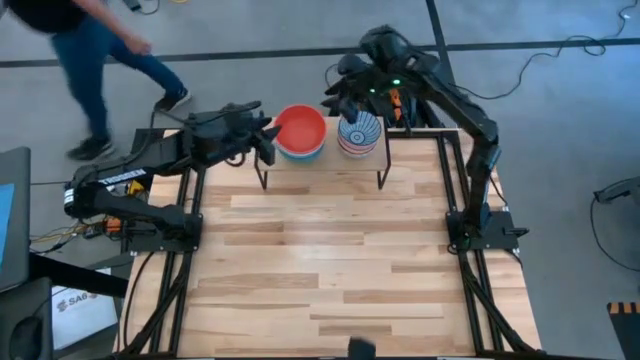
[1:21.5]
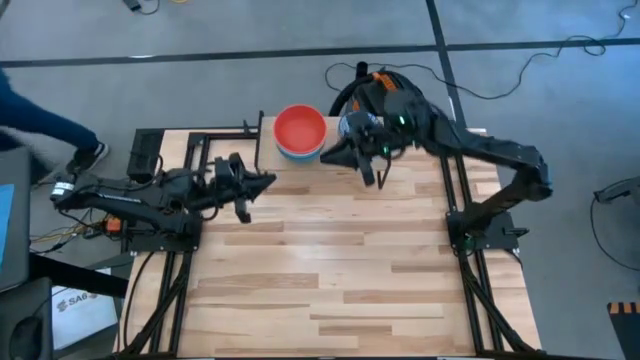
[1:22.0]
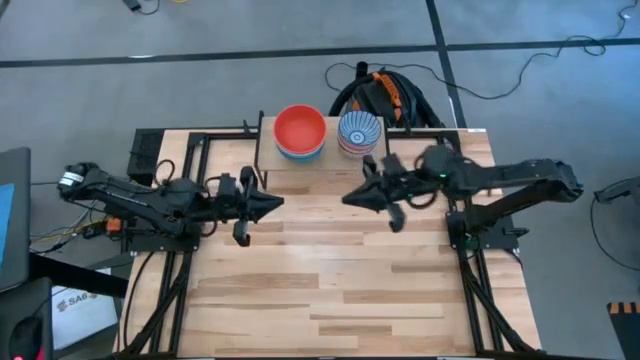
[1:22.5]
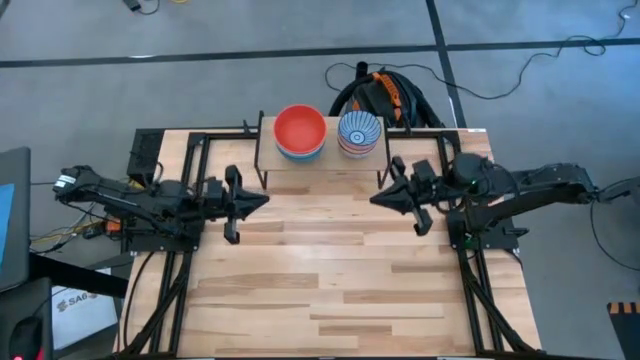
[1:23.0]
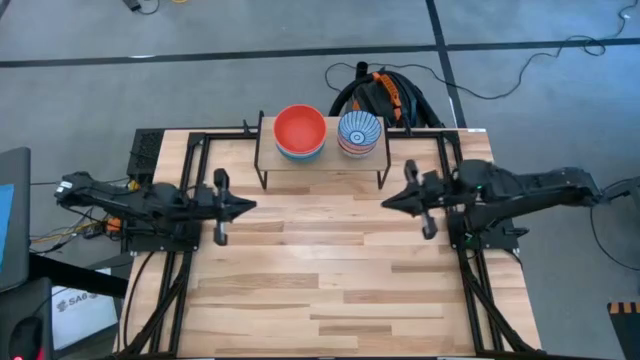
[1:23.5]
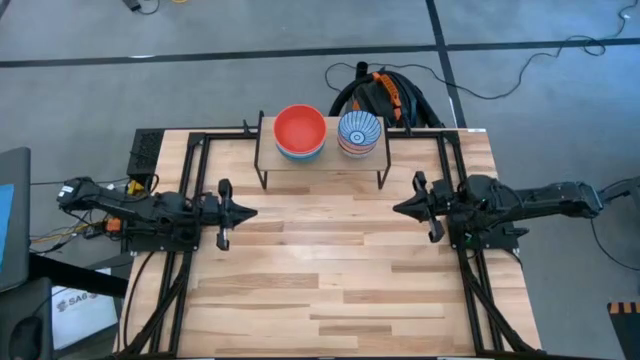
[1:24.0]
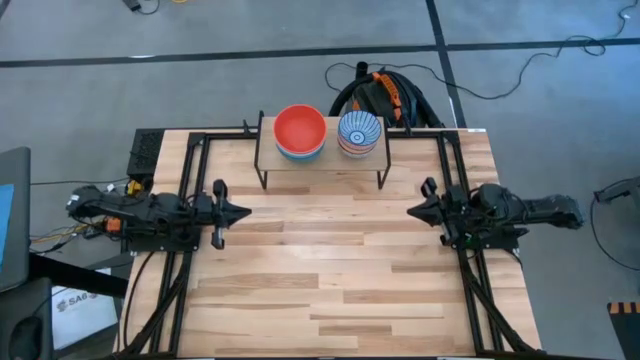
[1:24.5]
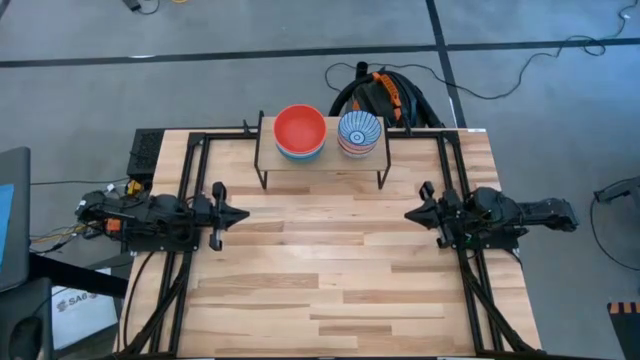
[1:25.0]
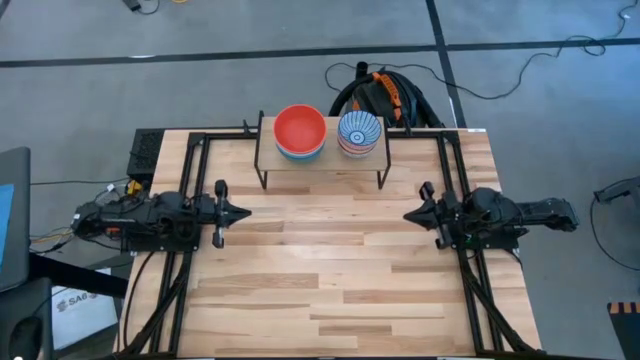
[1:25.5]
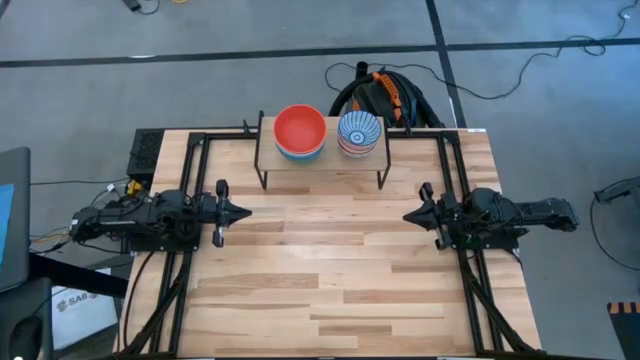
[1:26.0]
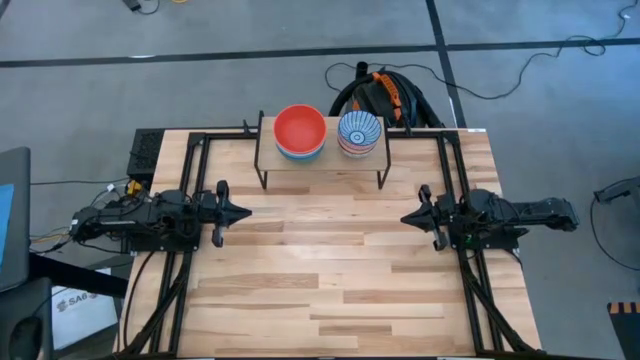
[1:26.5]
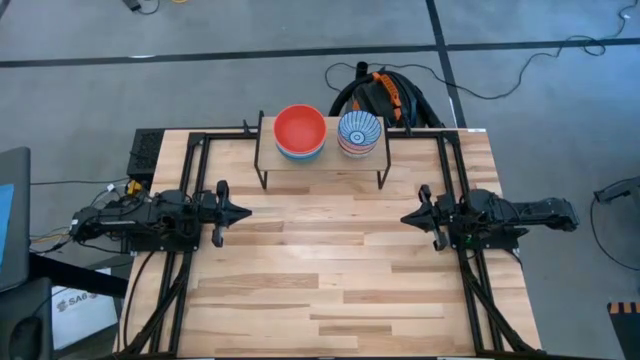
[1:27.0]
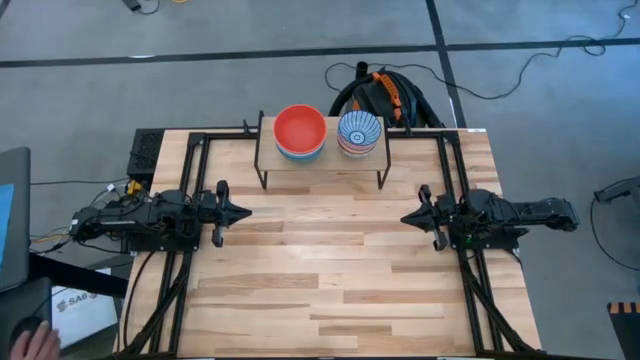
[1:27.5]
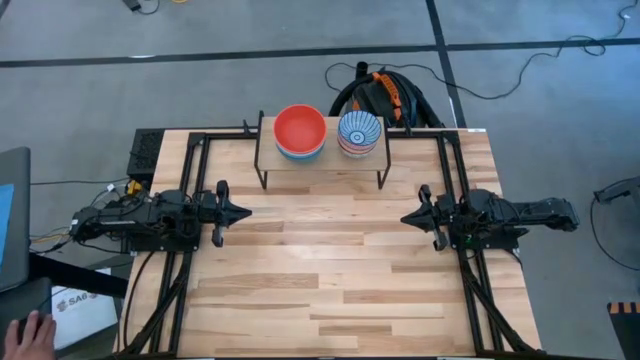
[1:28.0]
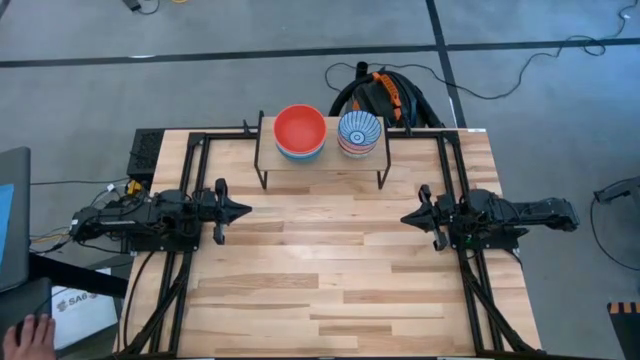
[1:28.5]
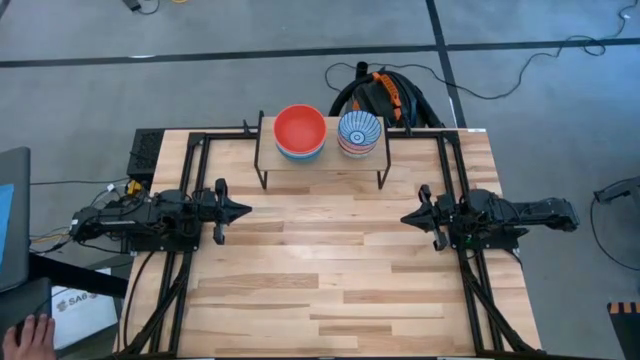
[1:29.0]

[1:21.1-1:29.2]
Task: Place and stack bowls onto a shelf
Return to Home Position

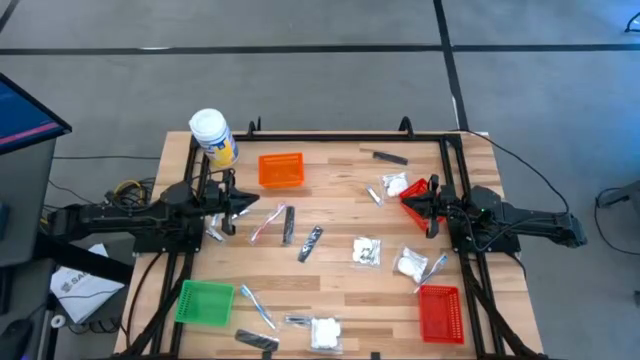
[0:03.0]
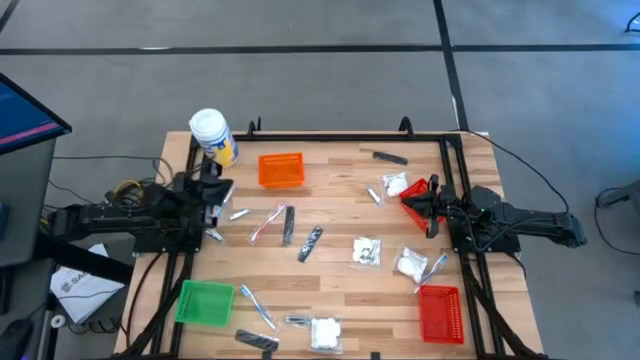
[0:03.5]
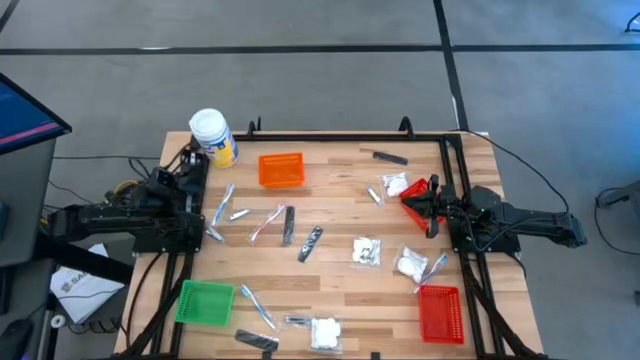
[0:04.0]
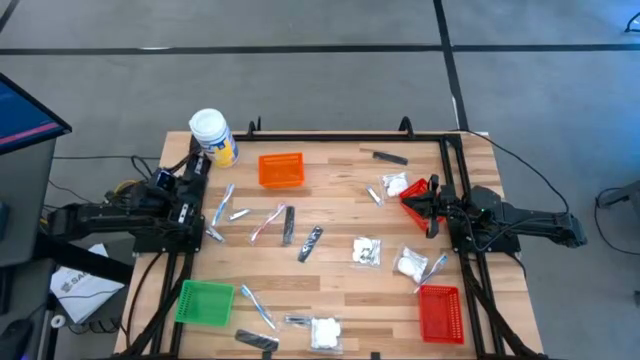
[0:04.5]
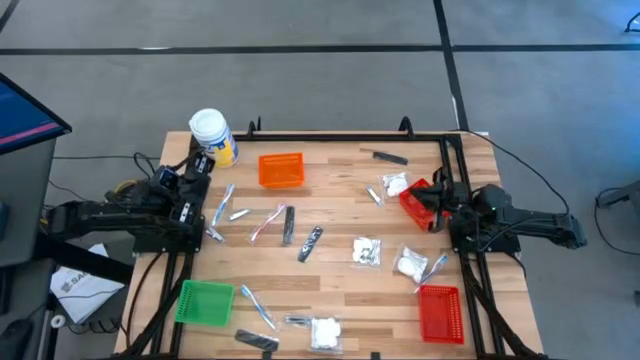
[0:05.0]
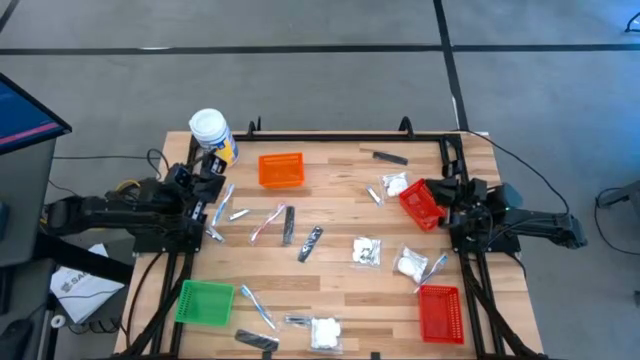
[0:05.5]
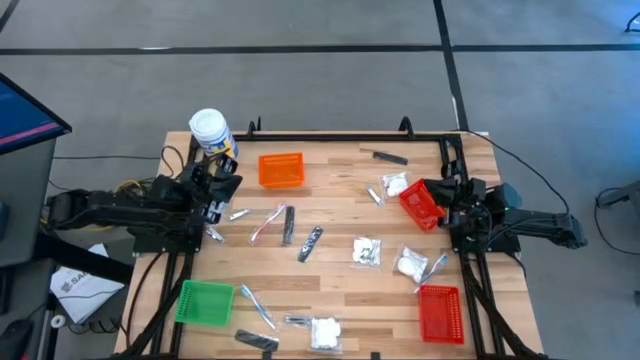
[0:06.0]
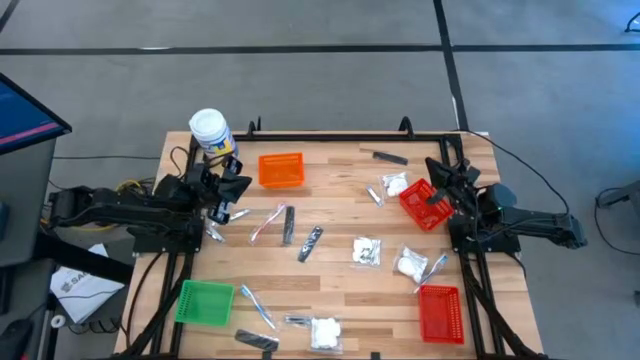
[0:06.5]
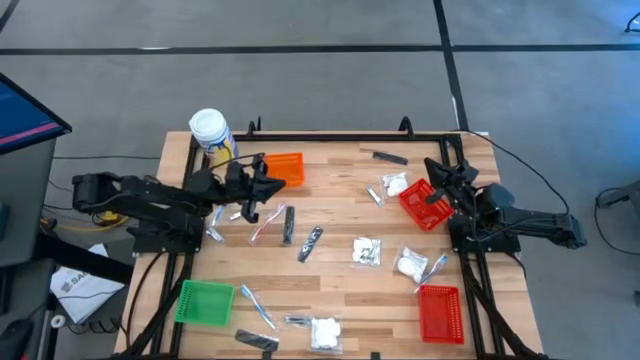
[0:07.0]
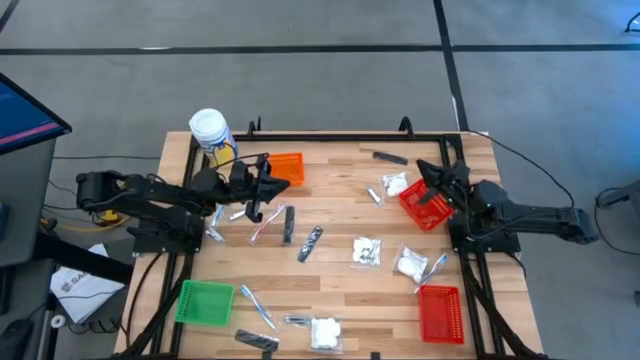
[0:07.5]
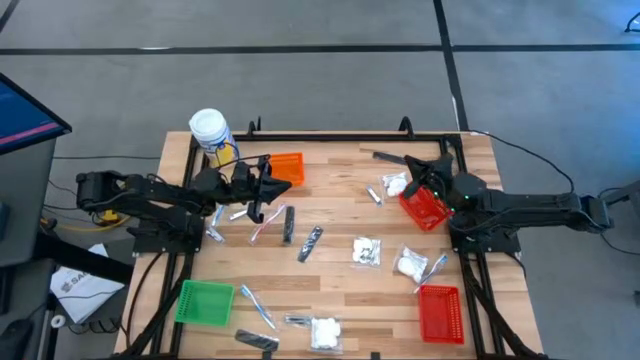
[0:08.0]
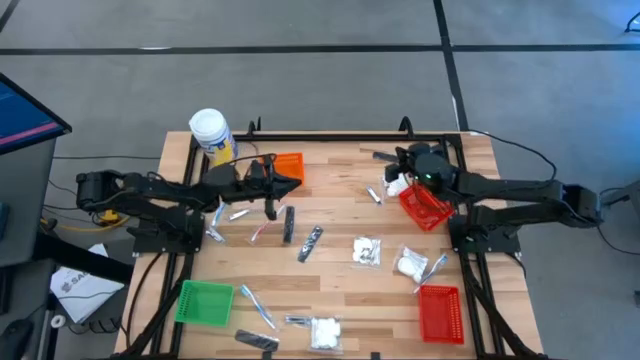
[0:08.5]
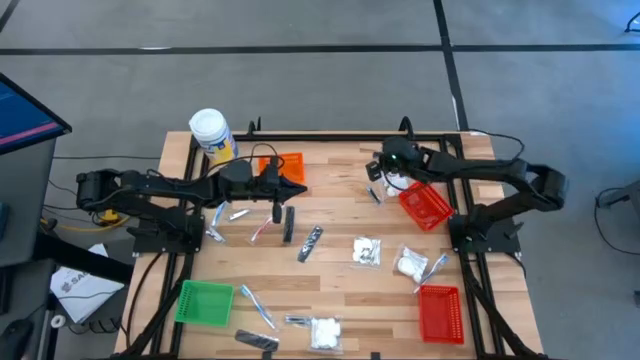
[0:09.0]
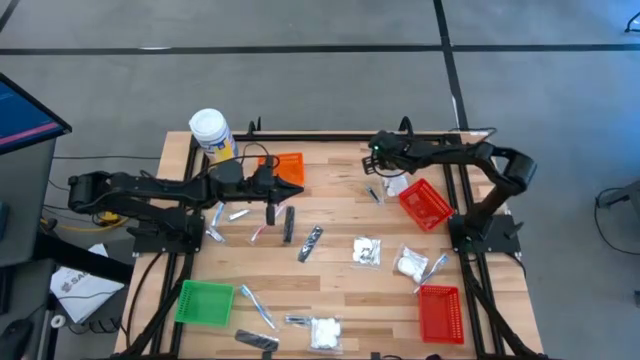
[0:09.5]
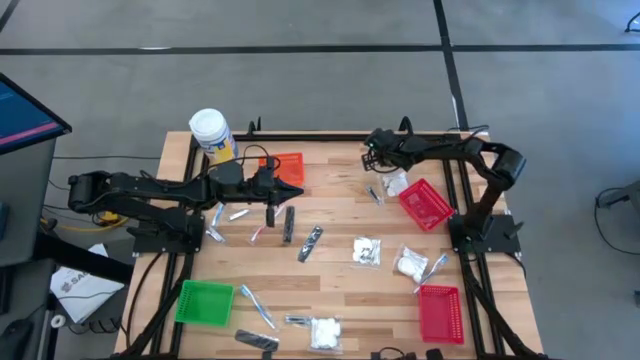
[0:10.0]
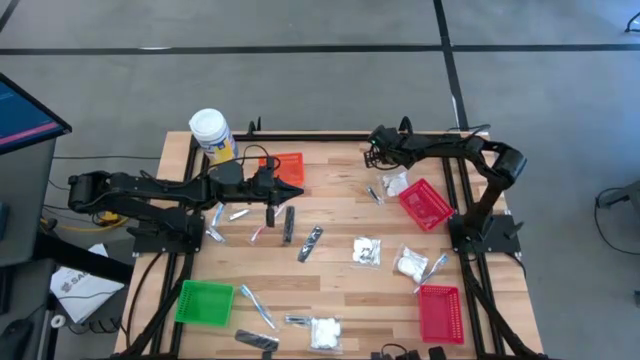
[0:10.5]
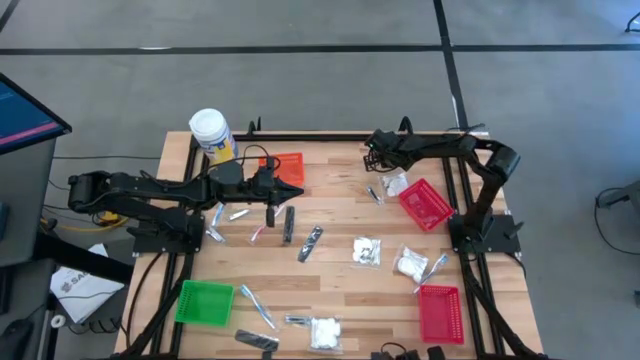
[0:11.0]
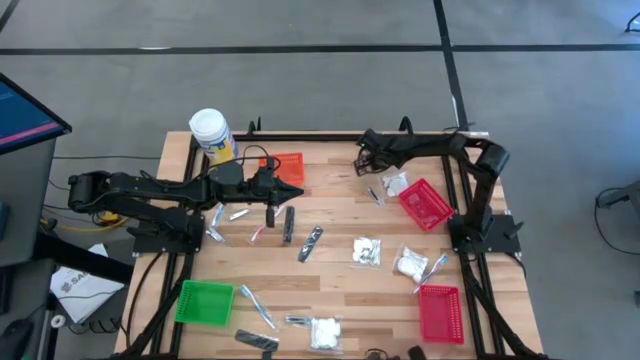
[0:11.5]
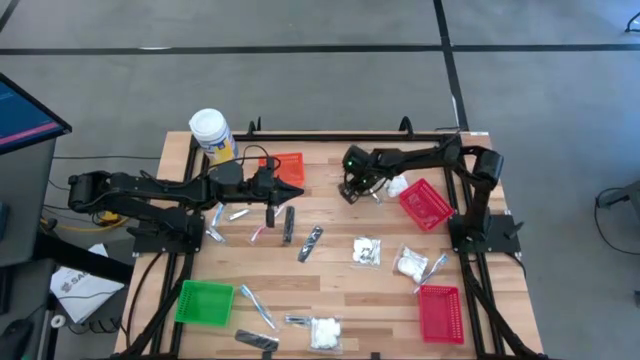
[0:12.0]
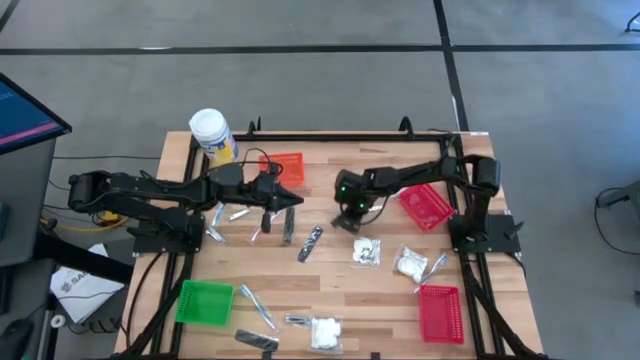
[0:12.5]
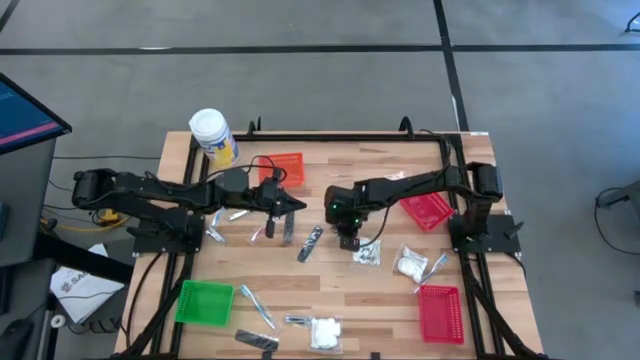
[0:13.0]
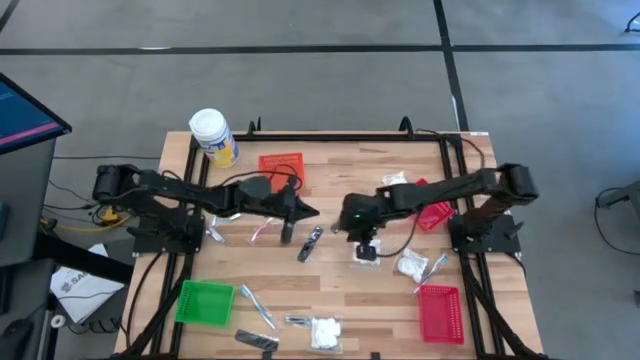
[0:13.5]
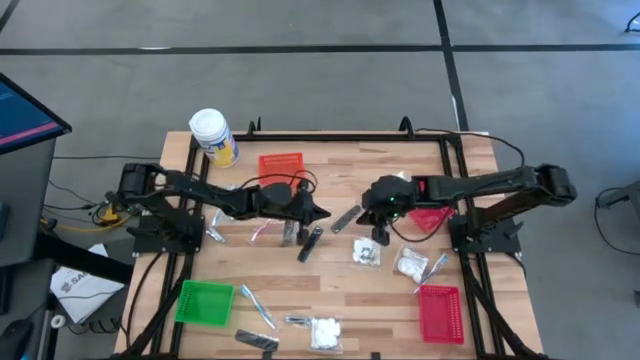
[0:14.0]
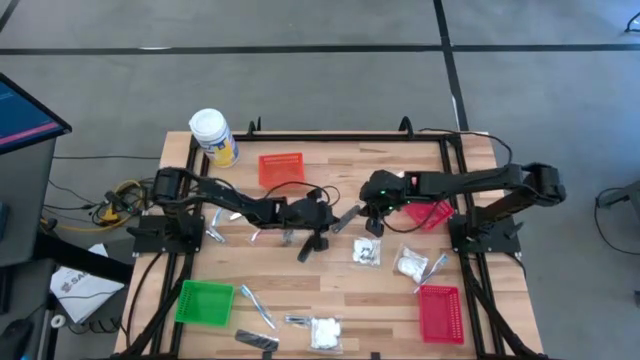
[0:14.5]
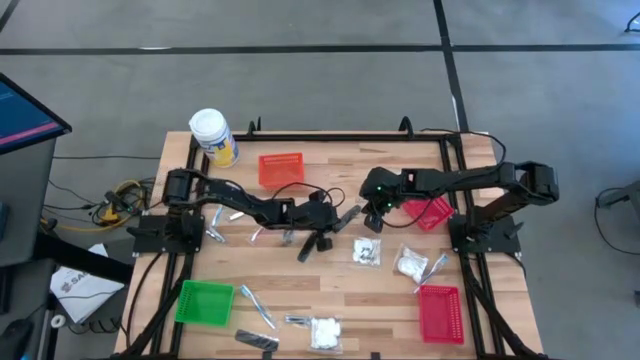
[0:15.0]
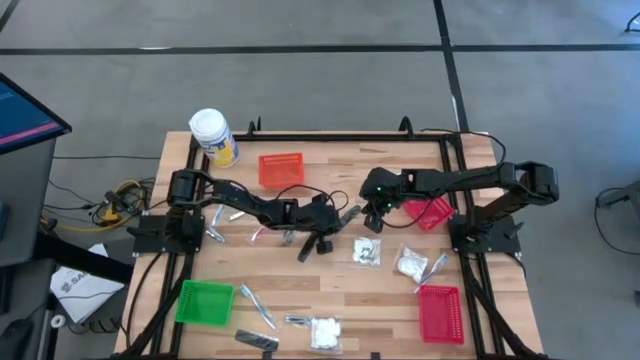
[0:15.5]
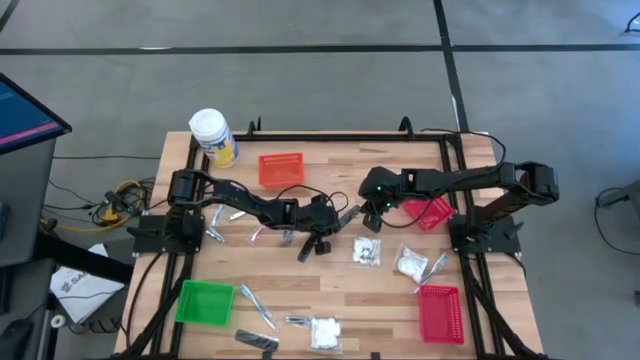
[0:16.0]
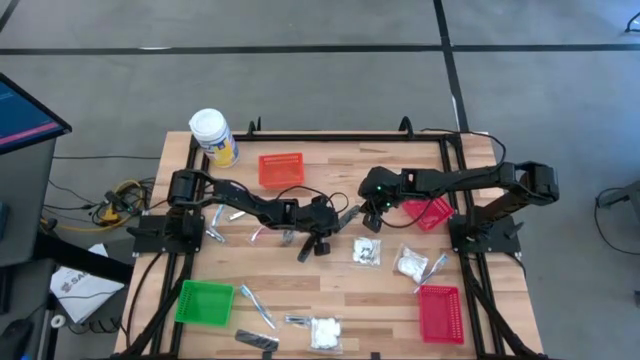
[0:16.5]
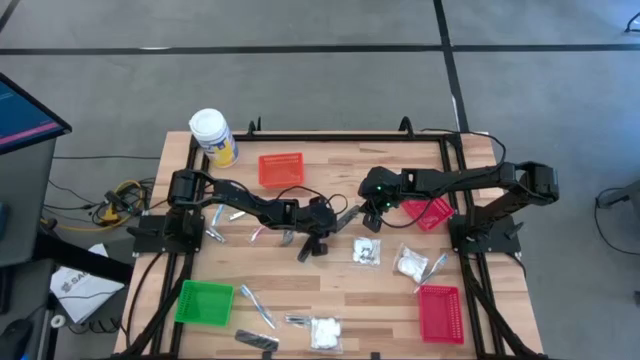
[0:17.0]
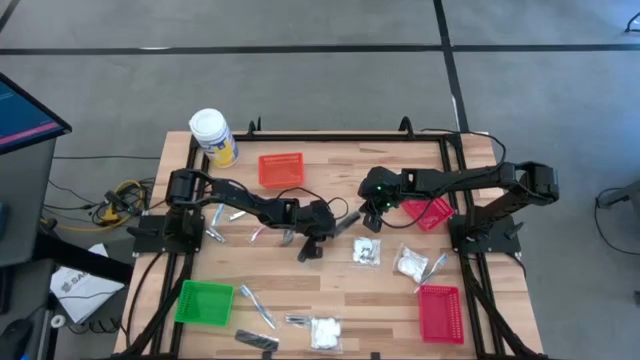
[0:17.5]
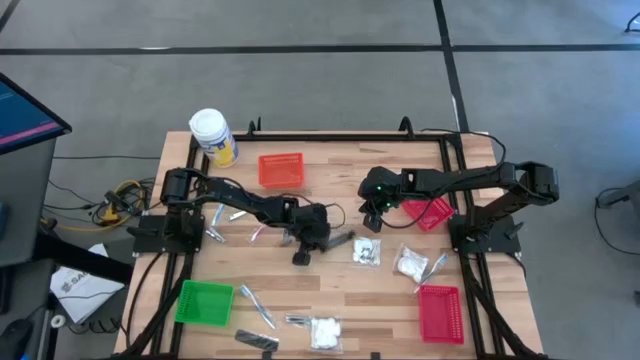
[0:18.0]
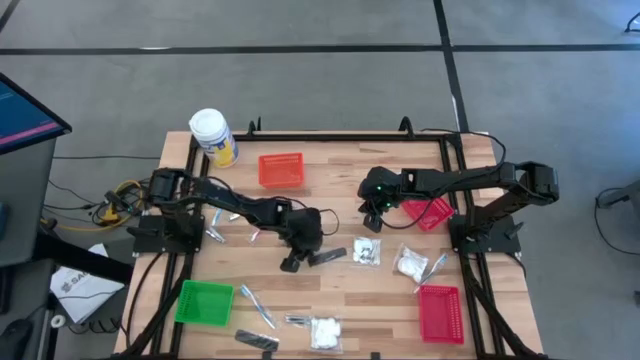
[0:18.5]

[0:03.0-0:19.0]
Task: Pick & Place Travel size toiletries
Put the black comb into the top red basket
